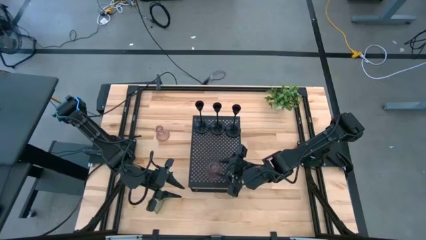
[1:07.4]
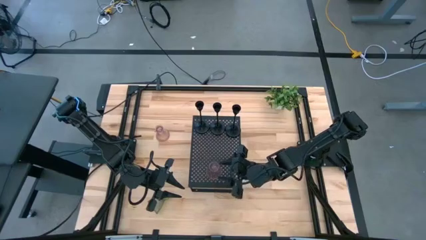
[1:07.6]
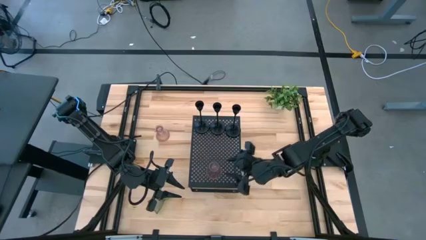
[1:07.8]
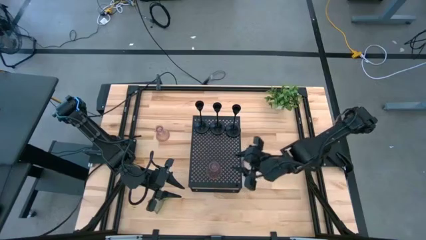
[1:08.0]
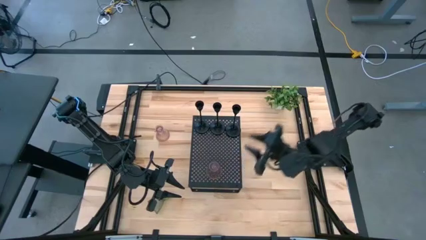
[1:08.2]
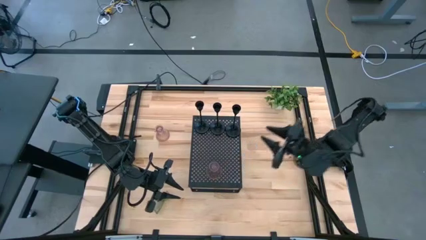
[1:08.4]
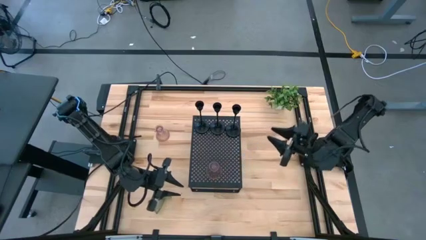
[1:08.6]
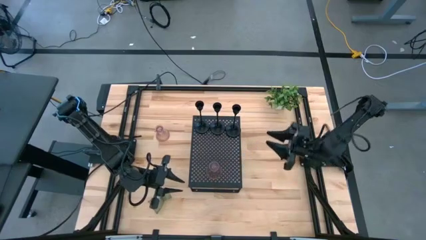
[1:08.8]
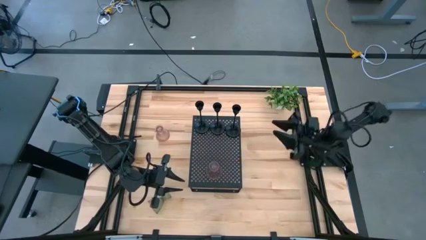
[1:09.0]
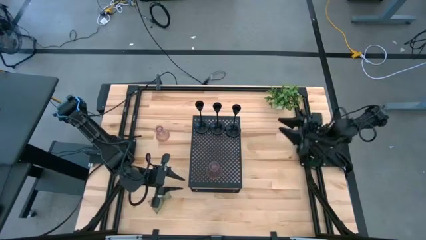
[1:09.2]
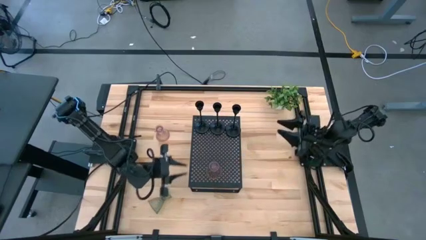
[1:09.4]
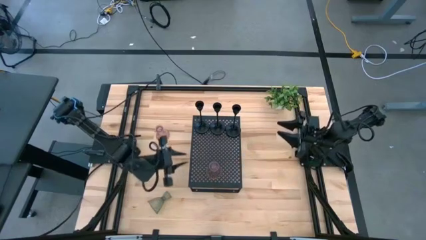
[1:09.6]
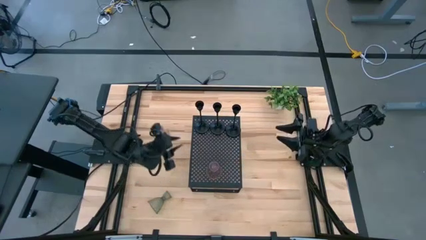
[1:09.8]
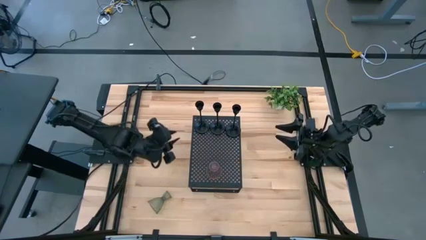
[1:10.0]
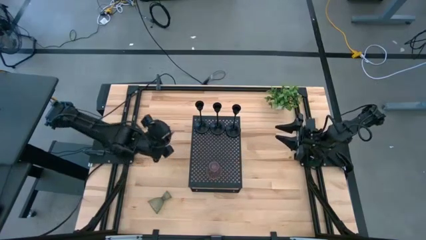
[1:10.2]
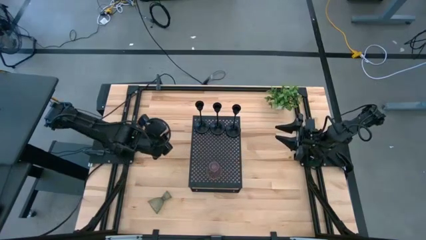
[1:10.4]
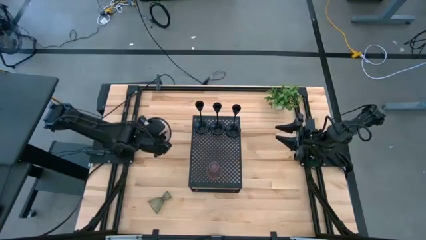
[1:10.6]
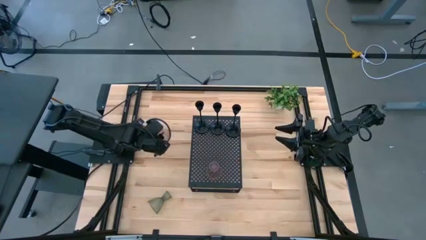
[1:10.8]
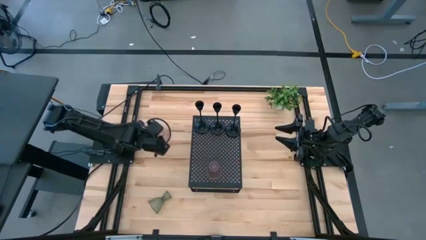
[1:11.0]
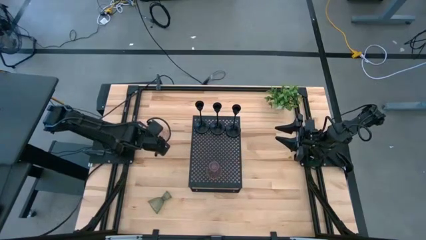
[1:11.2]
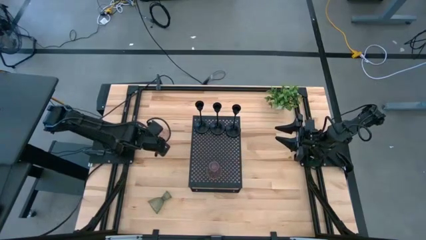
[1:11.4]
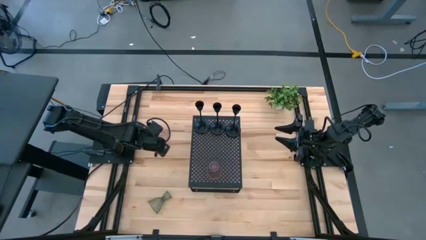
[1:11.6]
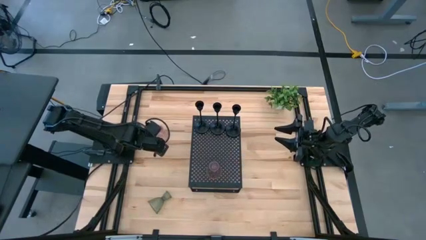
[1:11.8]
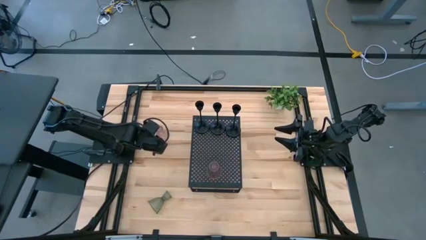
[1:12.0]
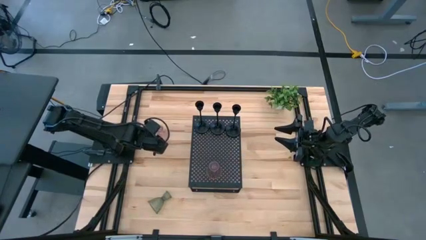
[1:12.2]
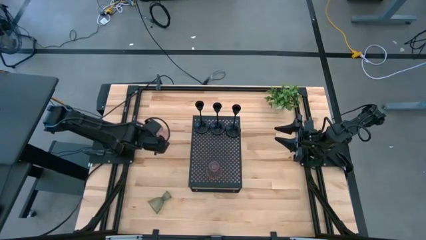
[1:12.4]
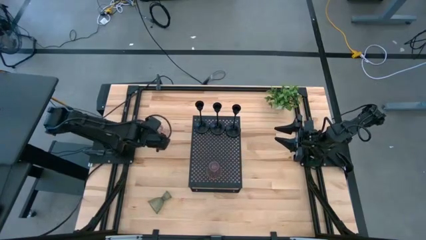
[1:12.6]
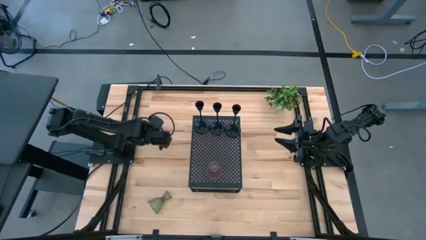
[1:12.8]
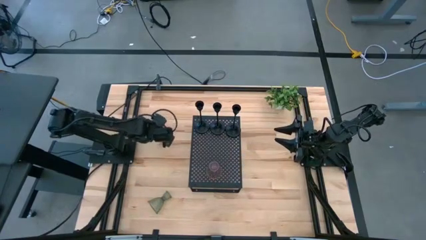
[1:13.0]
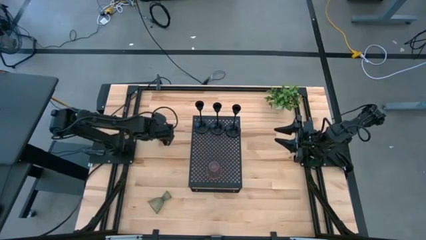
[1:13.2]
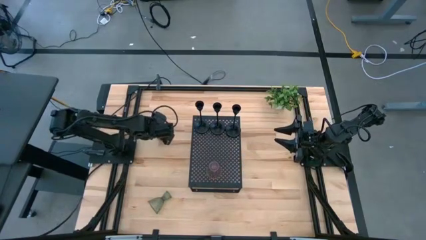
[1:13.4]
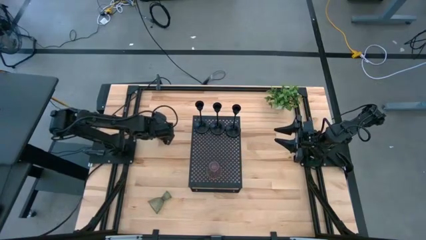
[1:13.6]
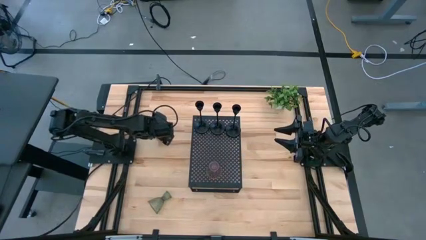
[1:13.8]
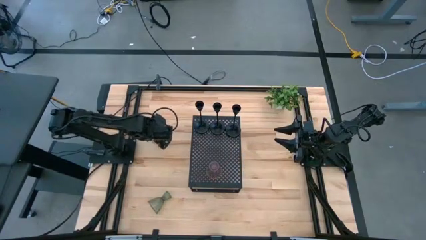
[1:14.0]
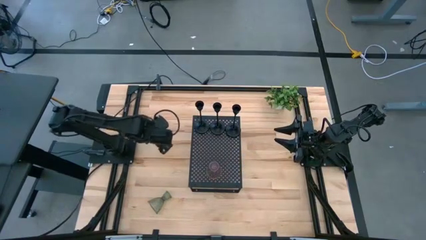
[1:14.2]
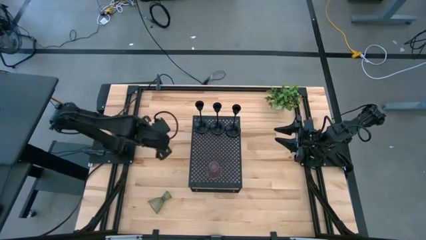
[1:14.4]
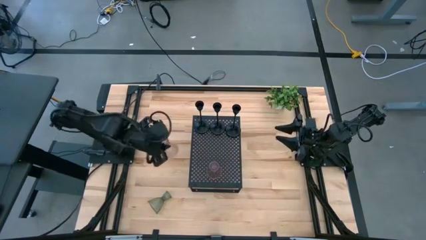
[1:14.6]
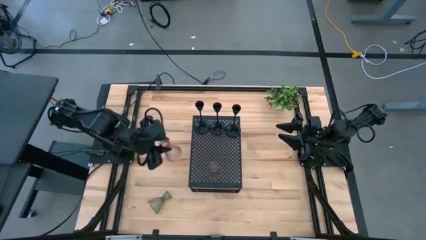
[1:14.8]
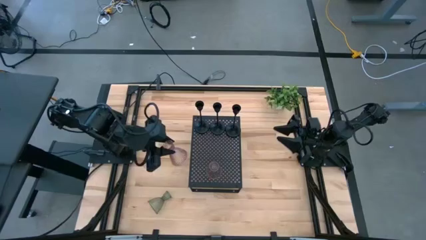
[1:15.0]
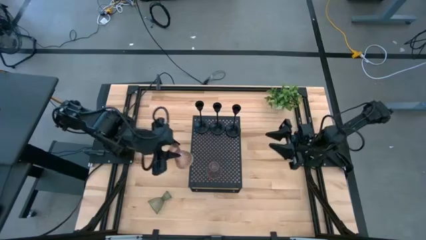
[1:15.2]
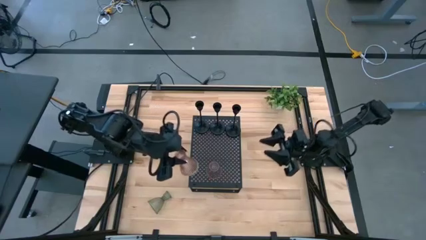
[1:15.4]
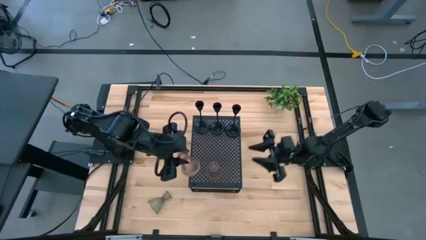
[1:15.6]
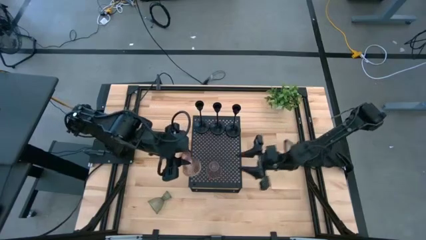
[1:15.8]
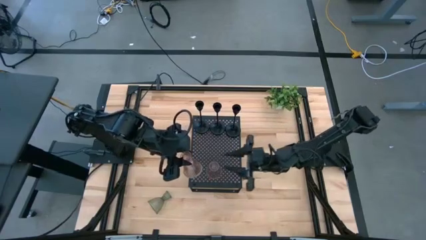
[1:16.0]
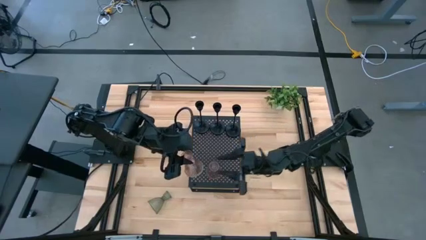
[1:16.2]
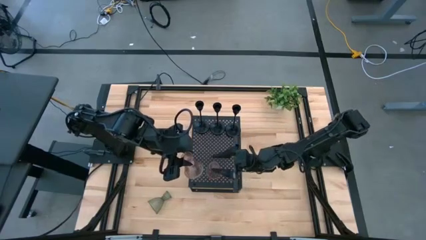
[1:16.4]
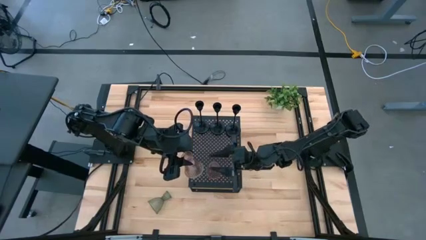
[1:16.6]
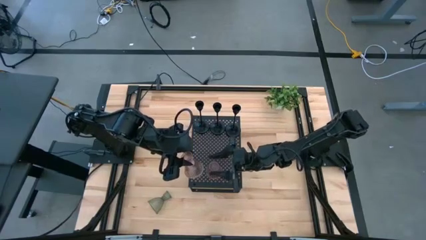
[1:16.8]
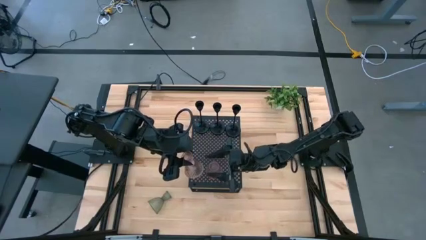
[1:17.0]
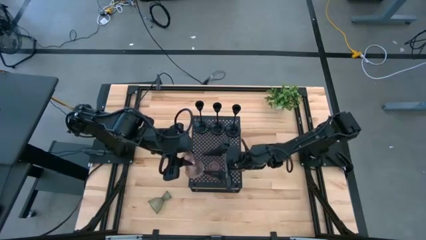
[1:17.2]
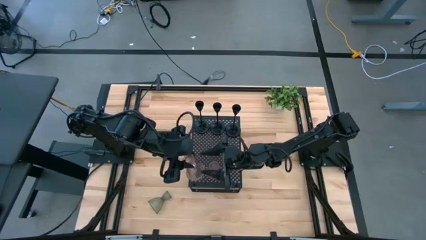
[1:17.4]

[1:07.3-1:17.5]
Task: Pick & Place candle stick holders
Put the pink candle holder on the shelf aligned with the other pink candle holder

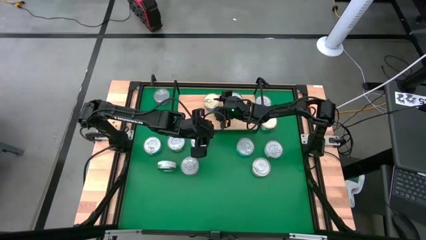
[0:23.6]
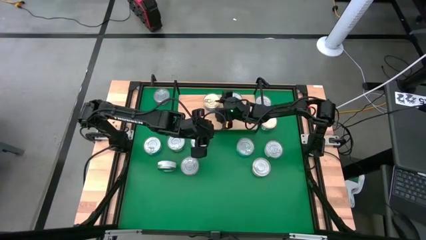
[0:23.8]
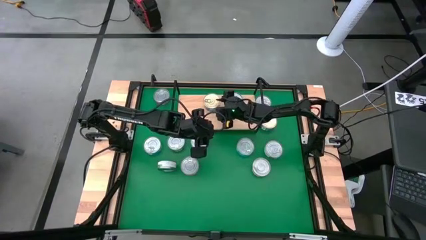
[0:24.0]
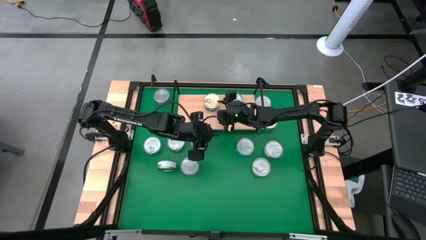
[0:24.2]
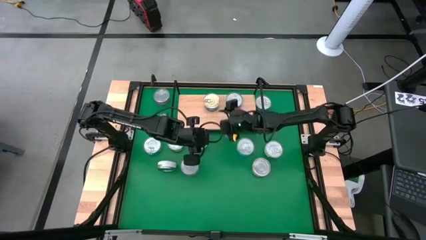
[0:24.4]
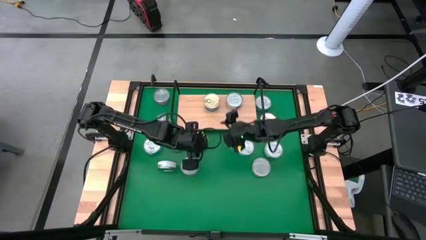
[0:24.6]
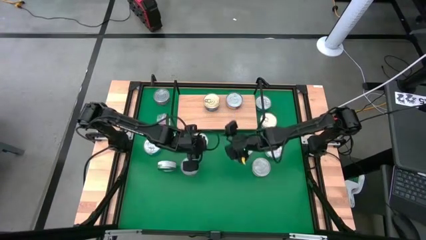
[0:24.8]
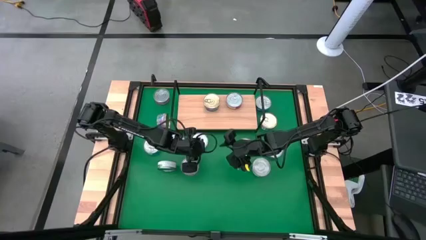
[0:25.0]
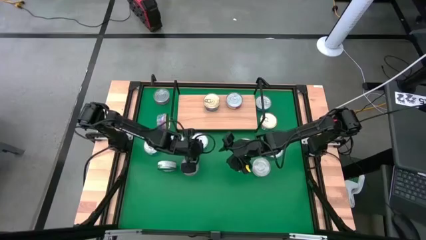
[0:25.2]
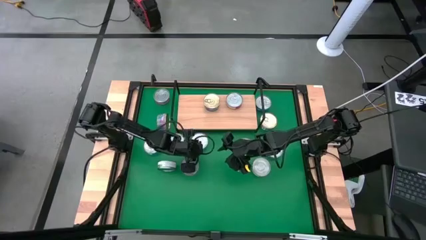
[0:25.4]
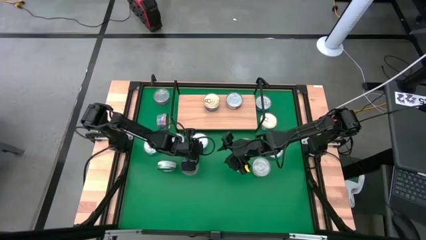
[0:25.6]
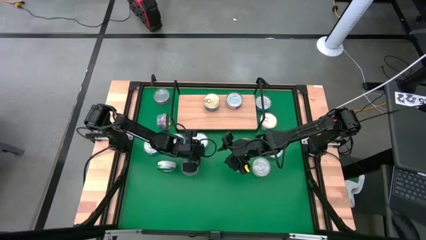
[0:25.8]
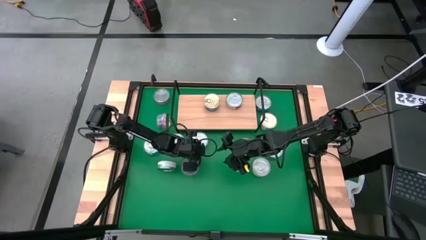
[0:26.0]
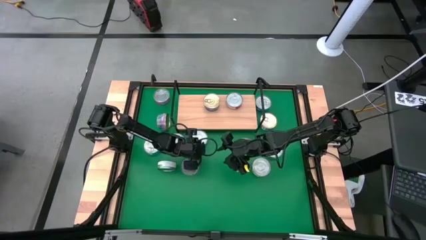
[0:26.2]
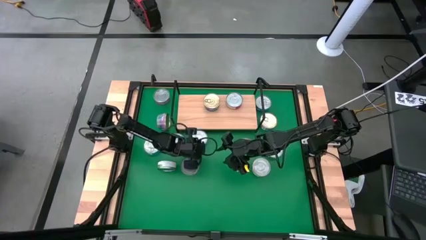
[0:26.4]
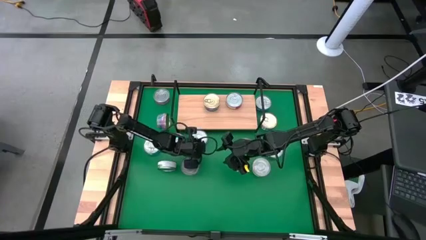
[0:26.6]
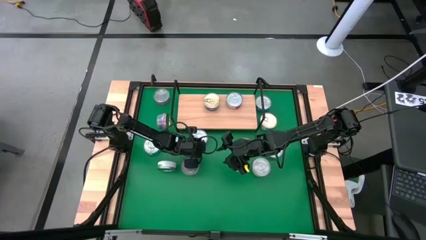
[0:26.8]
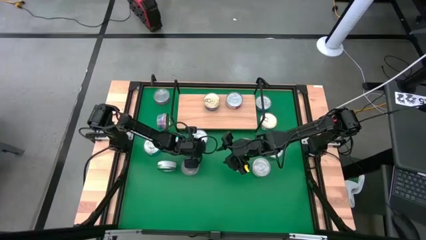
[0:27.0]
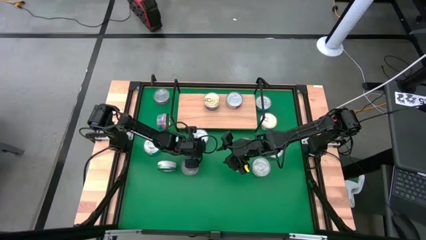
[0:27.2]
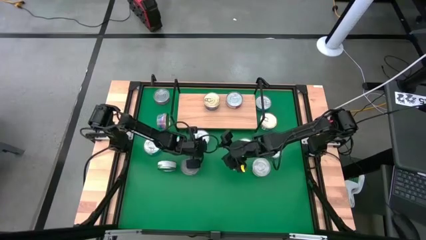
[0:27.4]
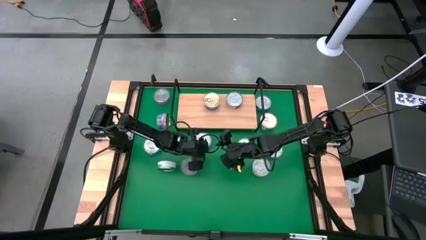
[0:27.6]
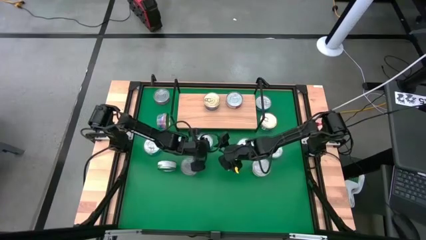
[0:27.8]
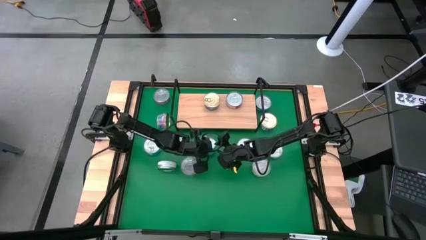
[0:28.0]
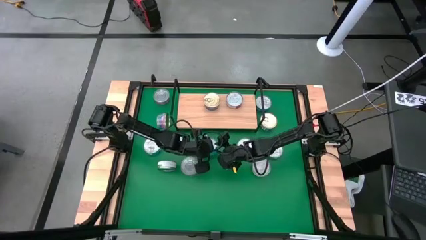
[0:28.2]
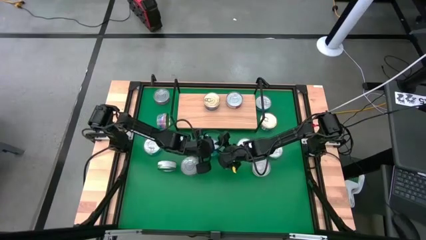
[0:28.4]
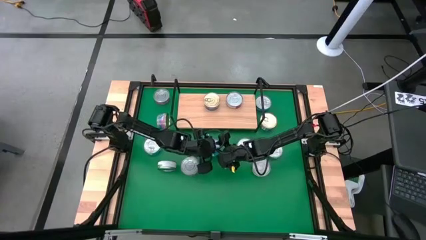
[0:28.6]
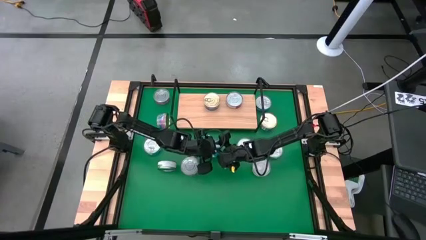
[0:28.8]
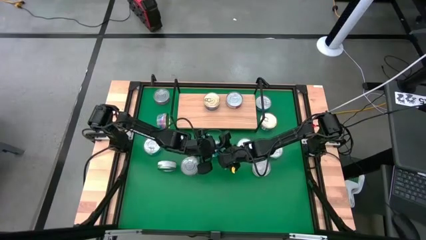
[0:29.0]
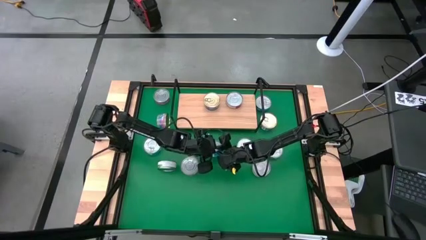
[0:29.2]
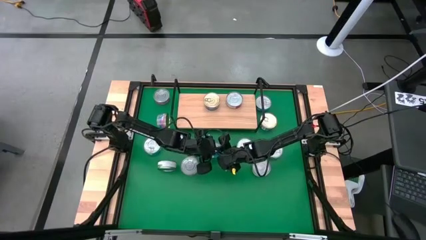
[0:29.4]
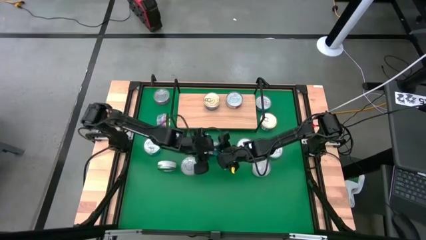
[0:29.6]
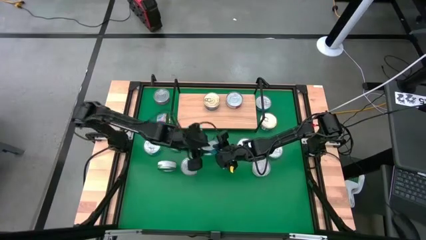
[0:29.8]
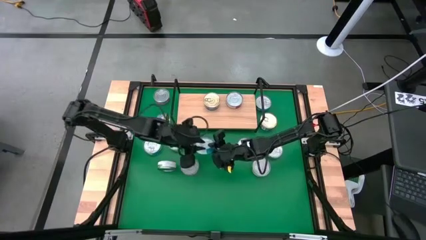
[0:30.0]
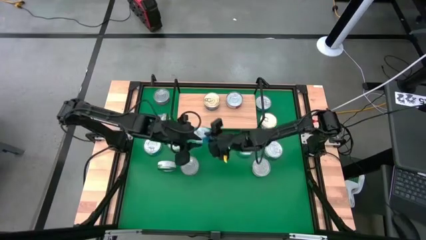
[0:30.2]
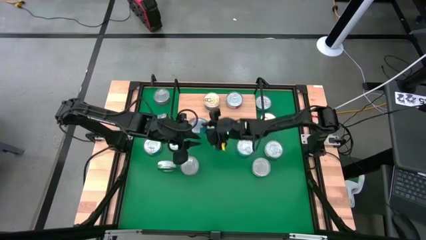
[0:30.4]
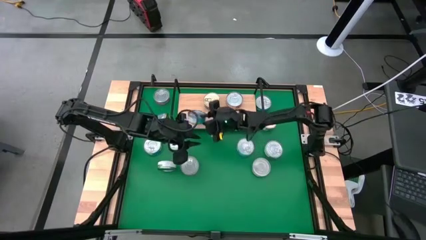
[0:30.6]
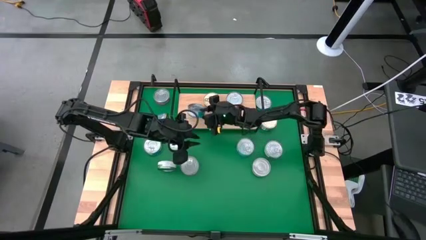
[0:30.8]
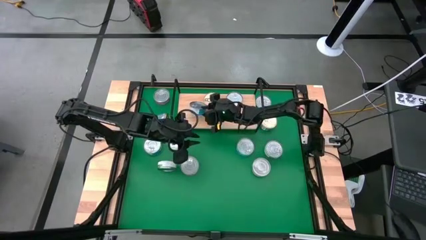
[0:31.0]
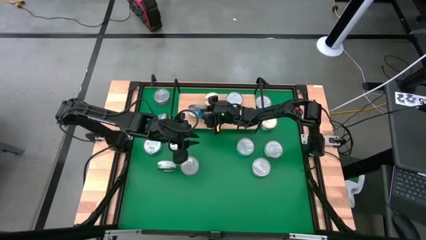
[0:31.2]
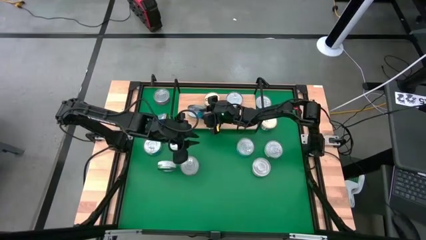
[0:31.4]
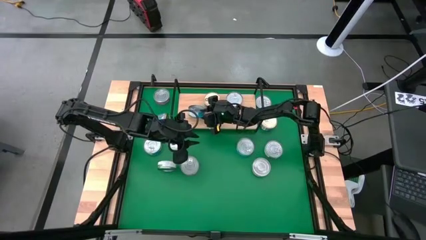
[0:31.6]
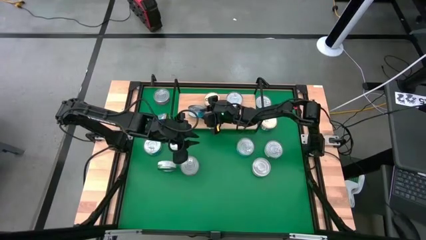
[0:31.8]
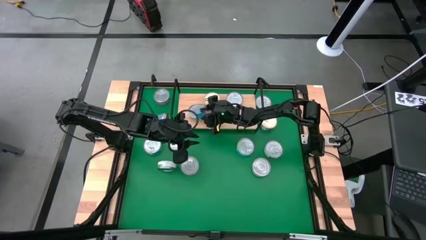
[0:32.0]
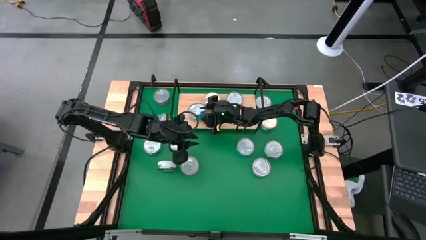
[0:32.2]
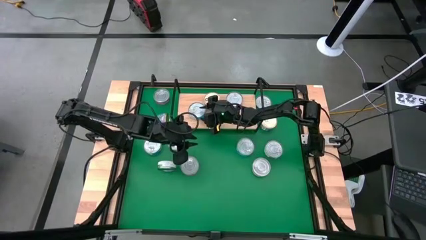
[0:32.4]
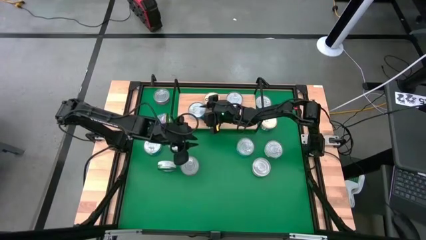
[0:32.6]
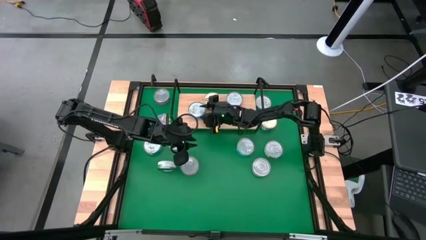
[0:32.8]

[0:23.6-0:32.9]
Task: Stack canned seafood by type on shelf
Put the yellow blue tuna can on the shelf
